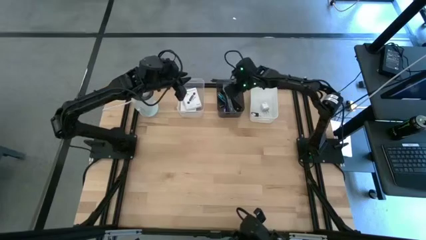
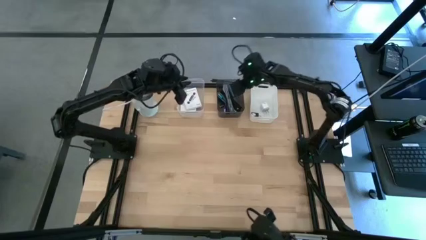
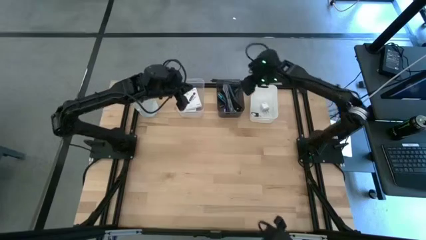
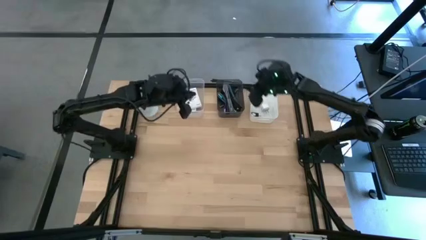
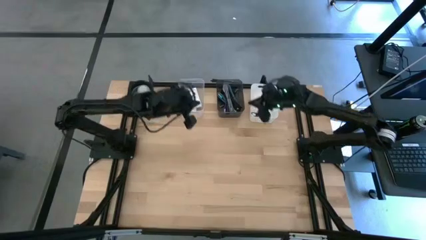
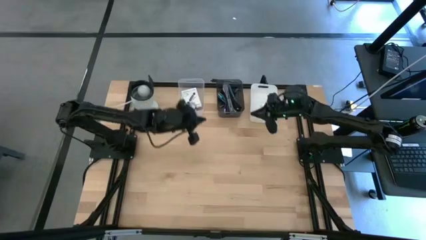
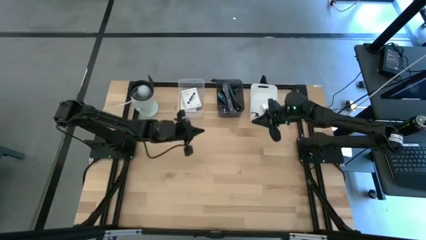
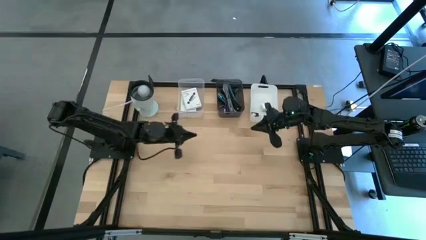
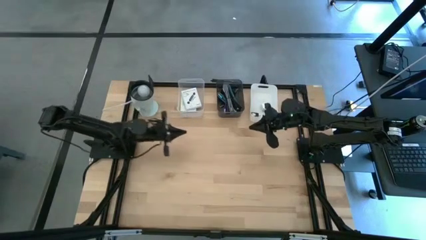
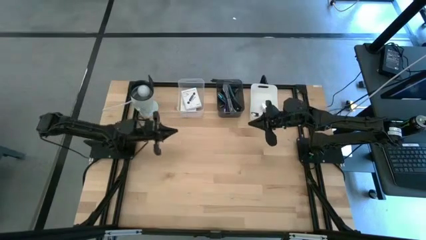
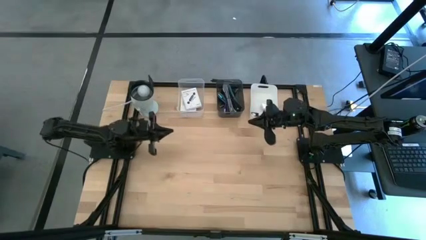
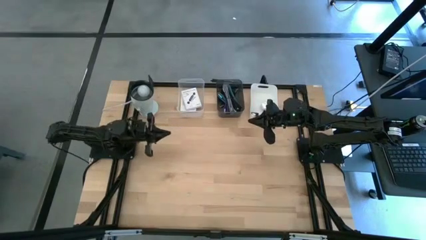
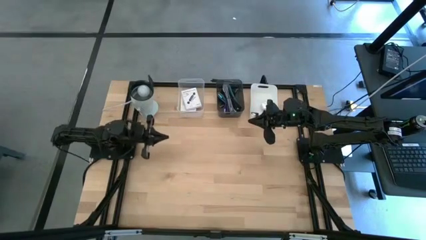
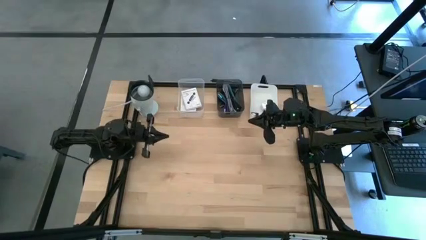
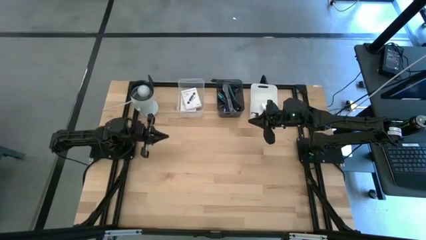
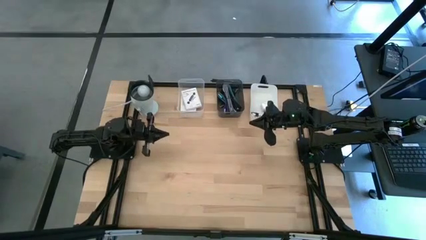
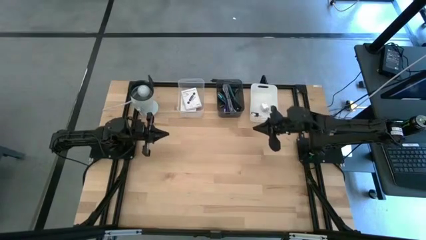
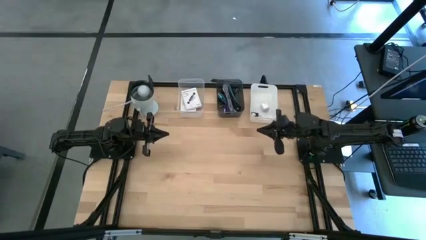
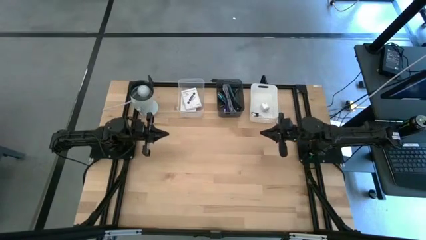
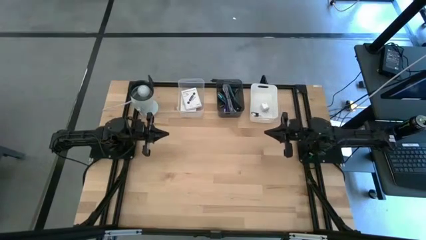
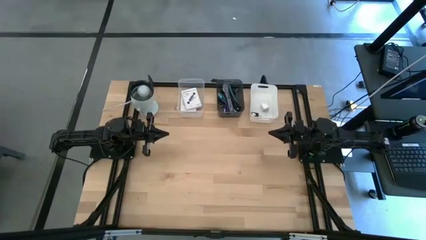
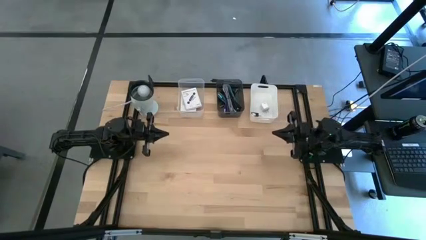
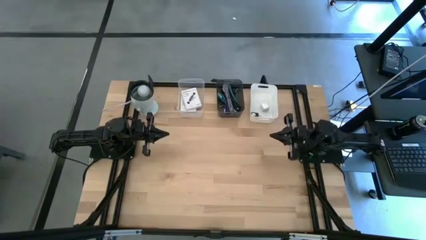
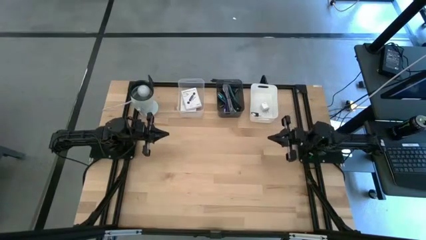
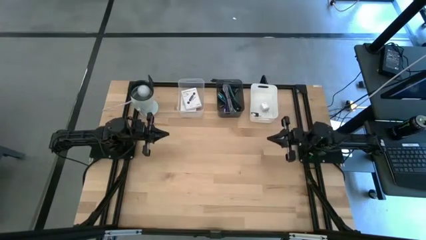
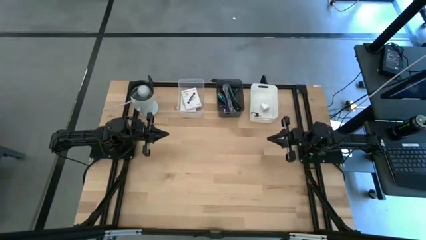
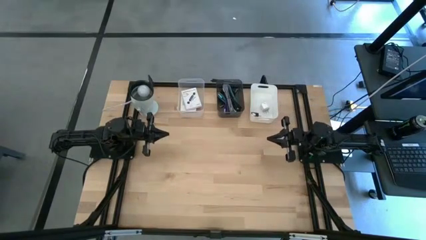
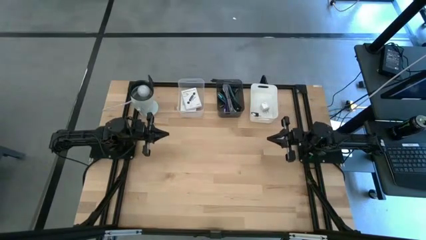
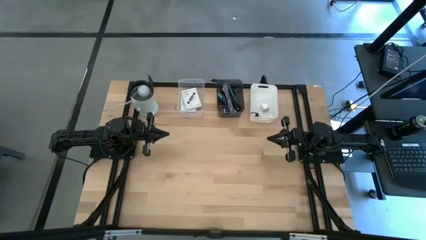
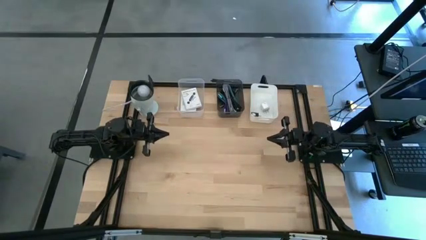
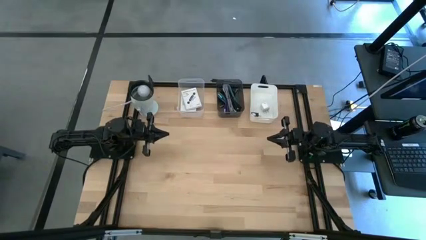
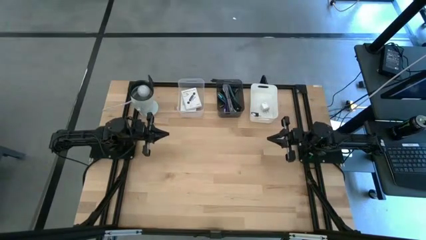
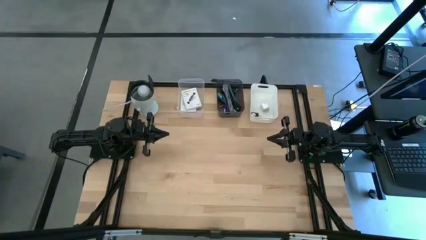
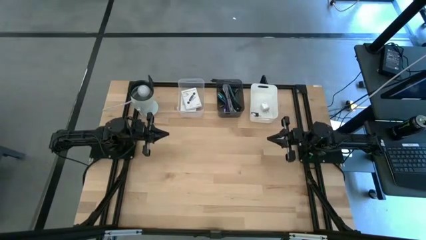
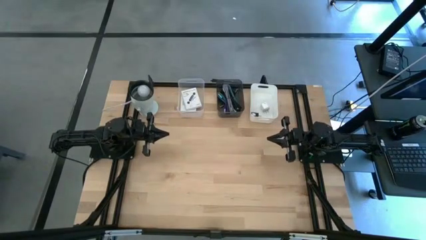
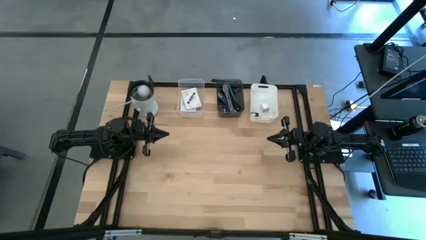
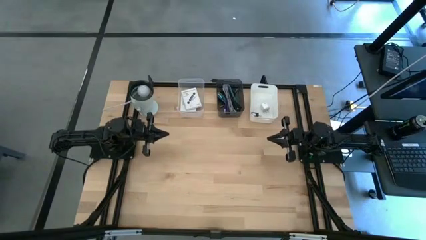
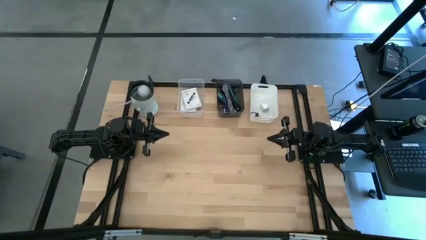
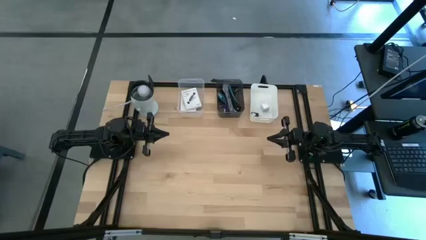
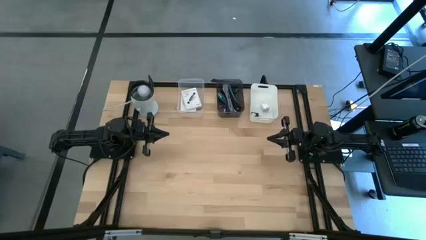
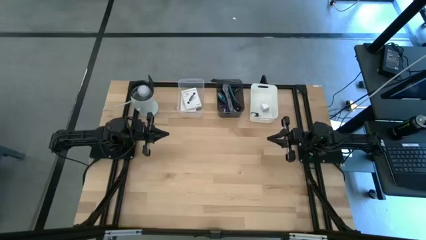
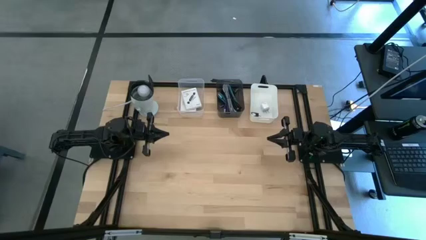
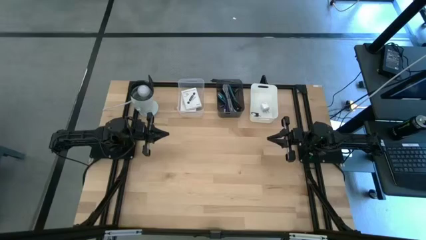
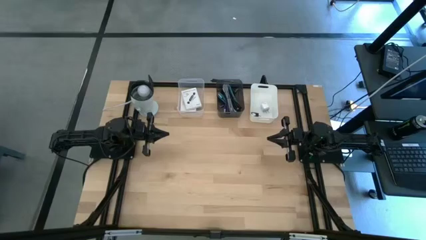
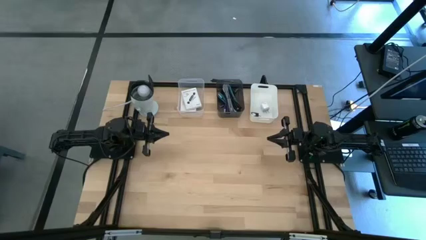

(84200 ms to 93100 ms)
Task: Pick and place items into bin
Return to Home Position

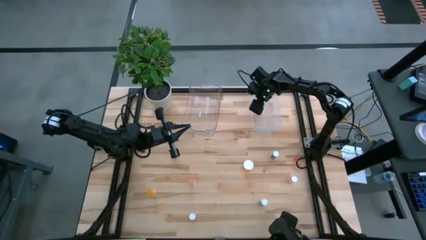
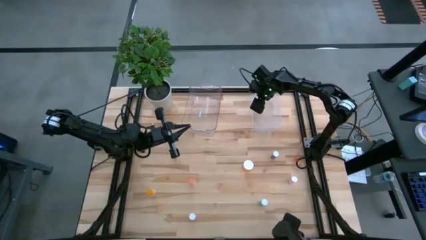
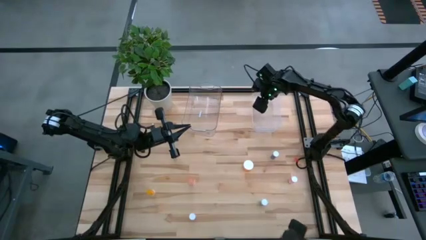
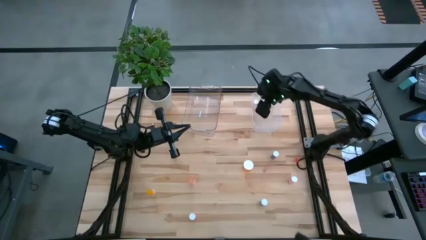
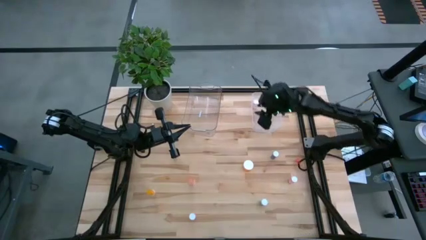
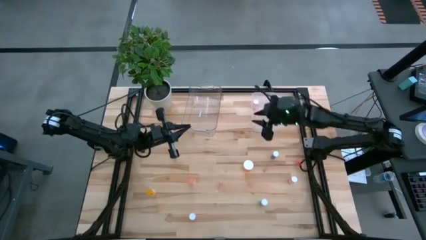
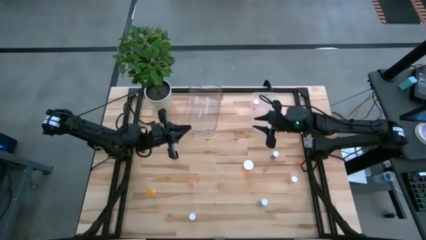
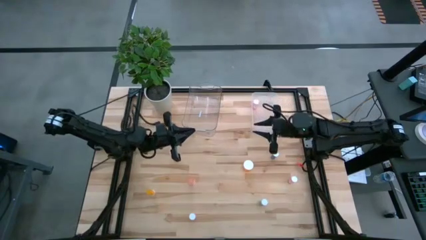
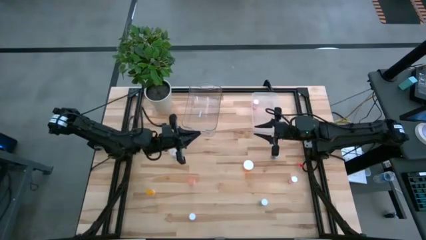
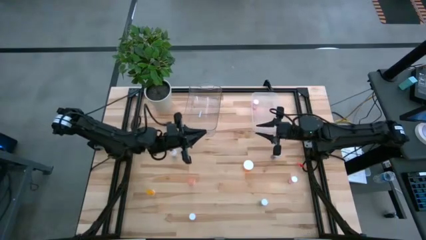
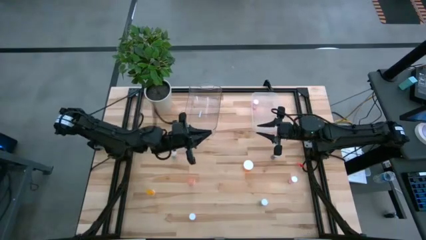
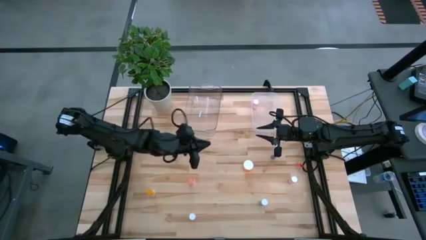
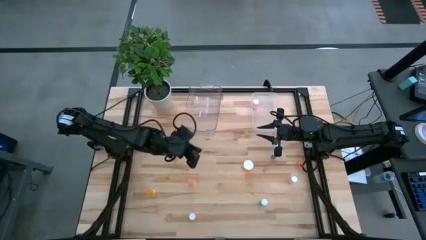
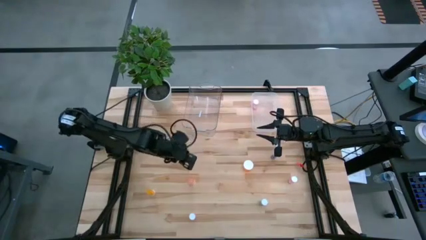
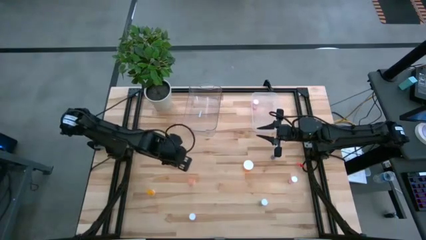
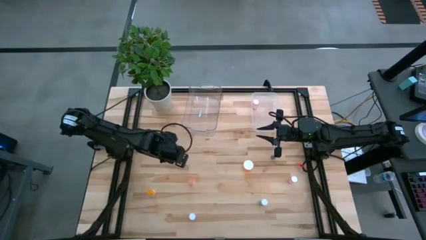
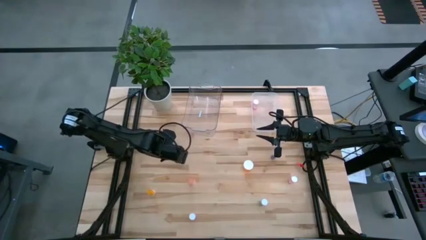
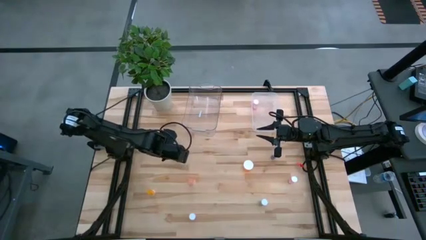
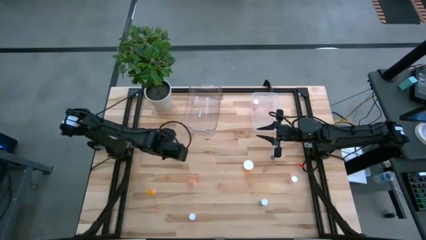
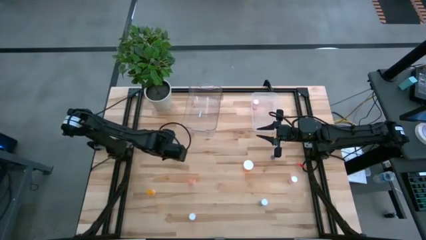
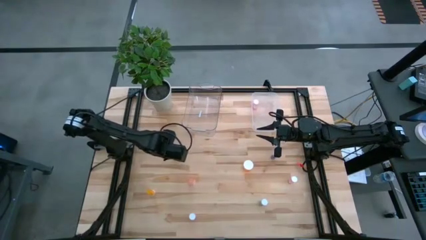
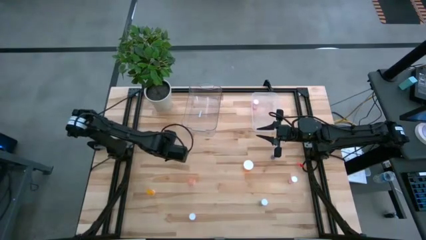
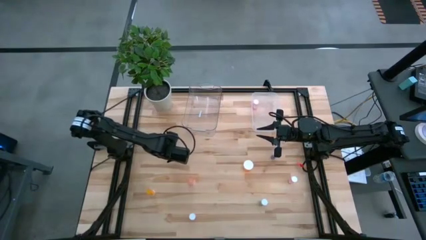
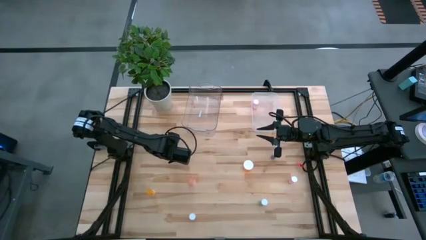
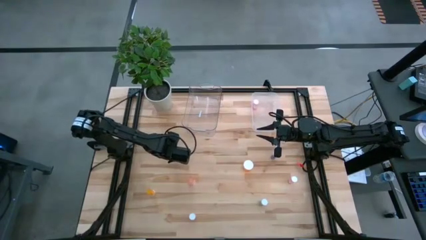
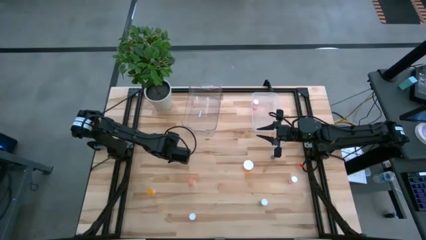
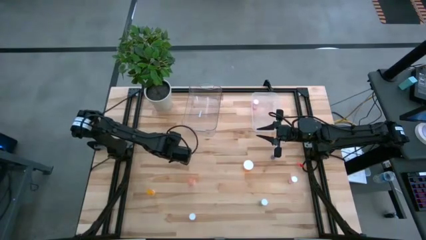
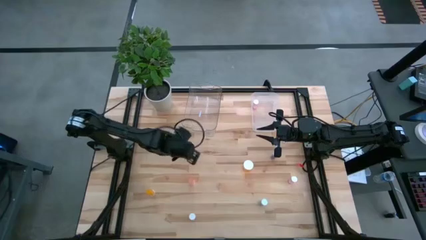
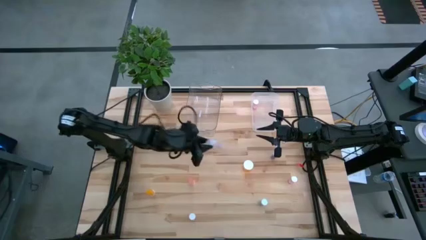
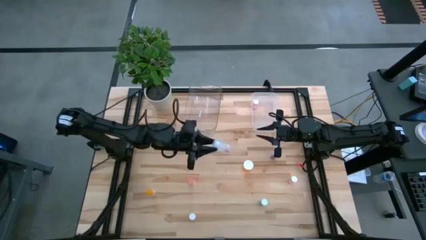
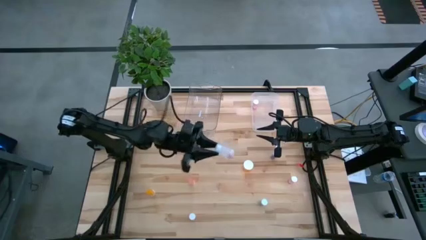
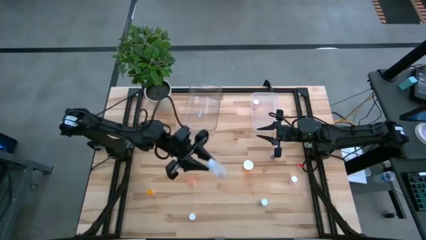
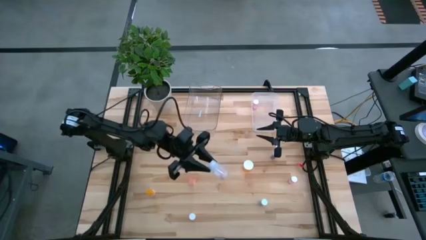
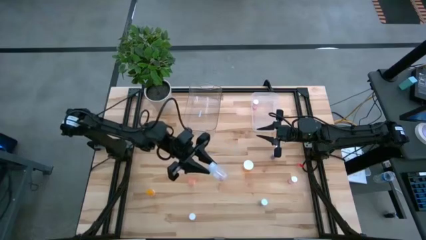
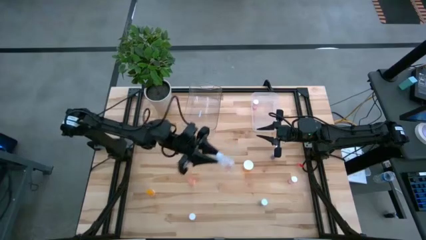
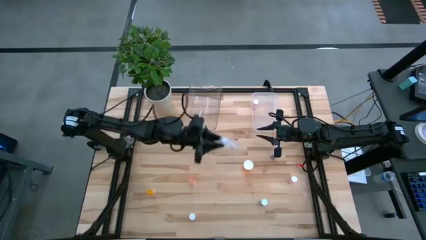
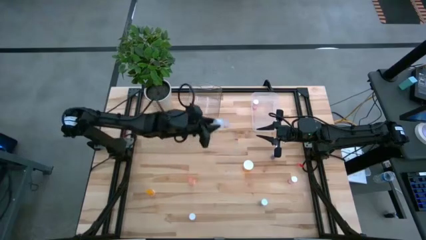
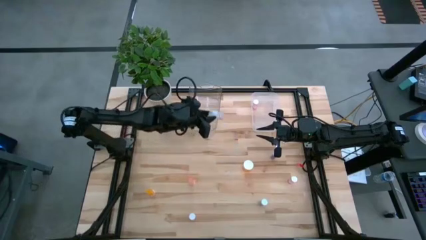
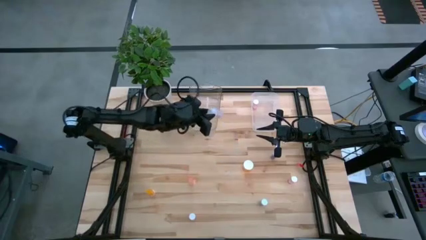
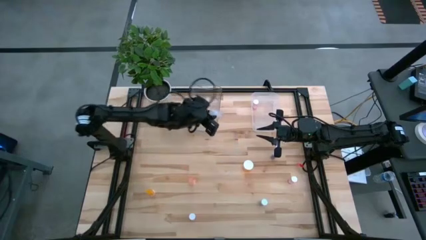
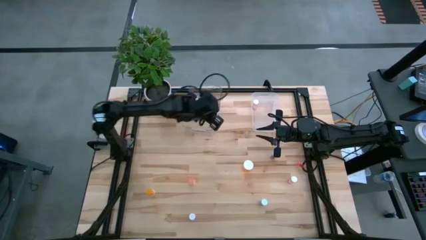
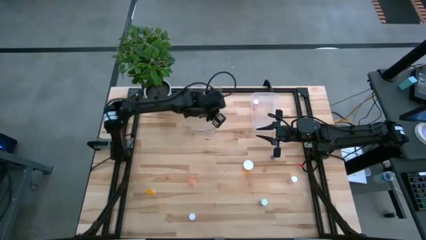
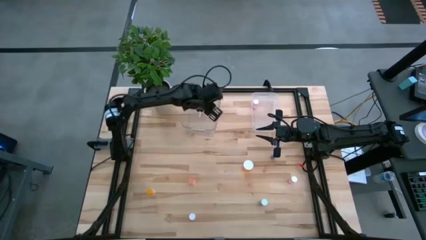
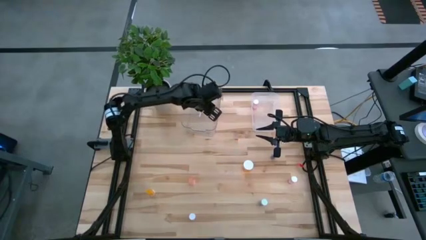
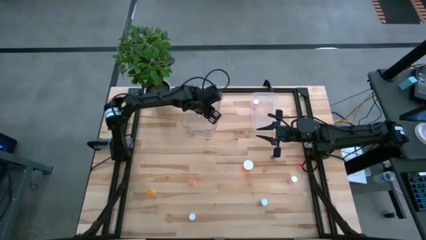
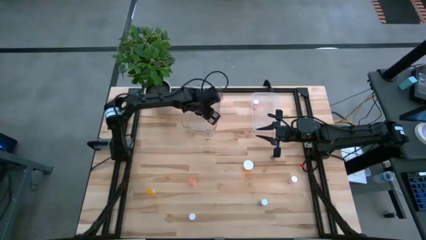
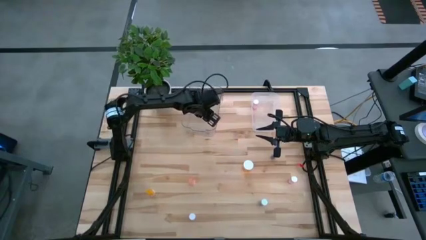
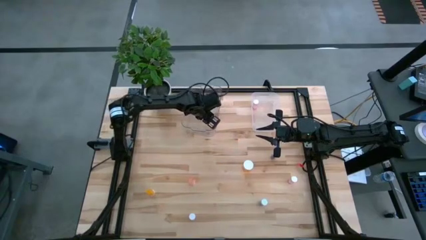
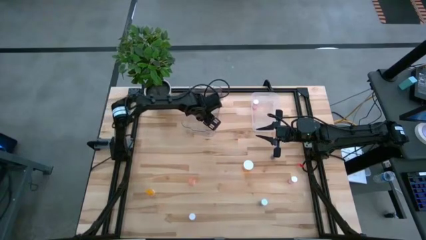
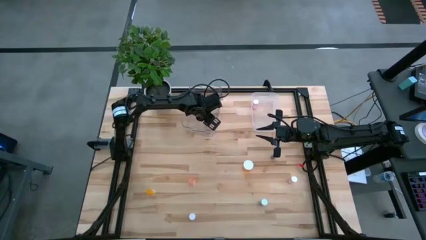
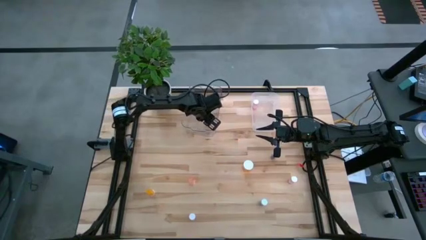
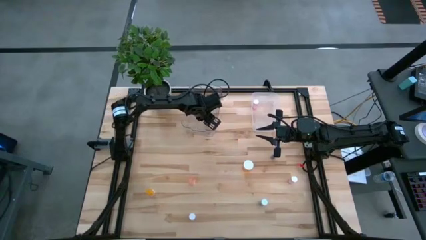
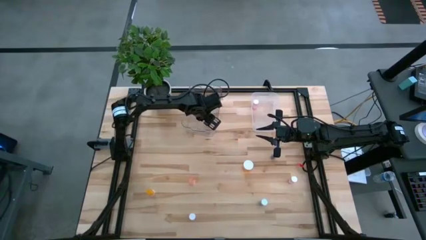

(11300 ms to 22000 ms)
Task: Pick and place medicine bottles into bin by pill shape (circle, oval)
Put the transparent capsule pill bottle into the left transparent bin
